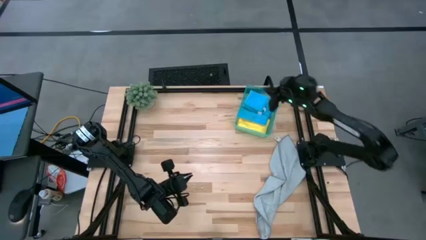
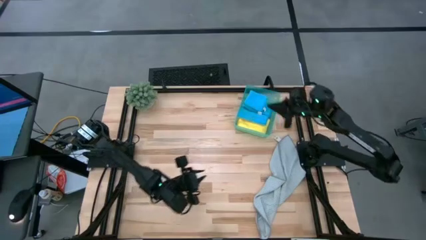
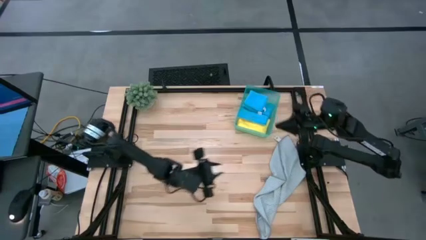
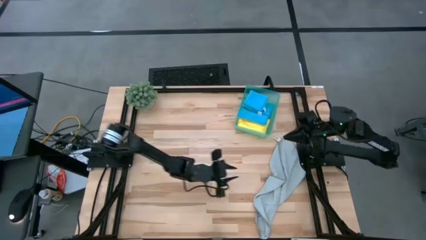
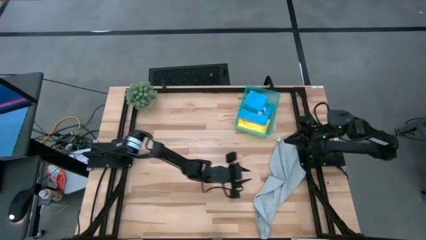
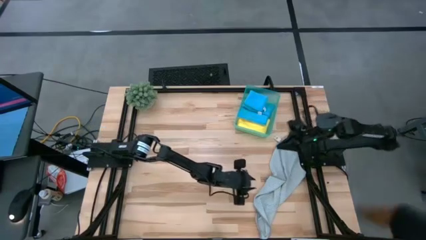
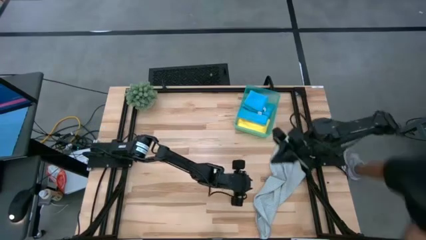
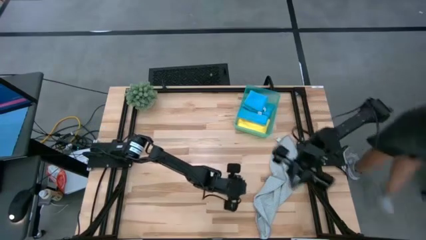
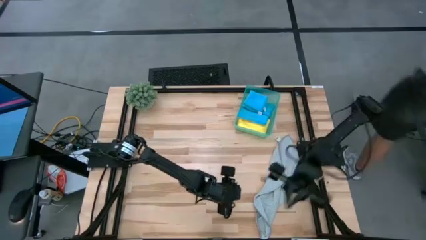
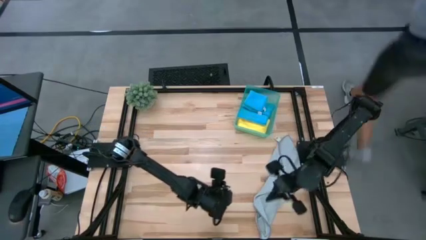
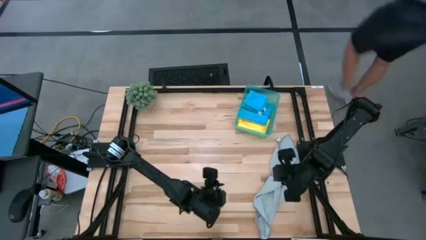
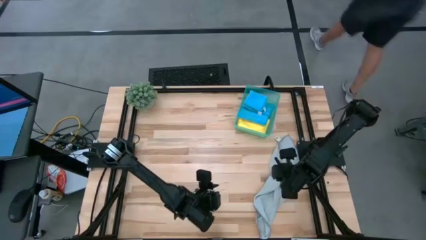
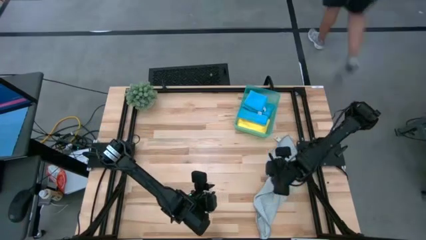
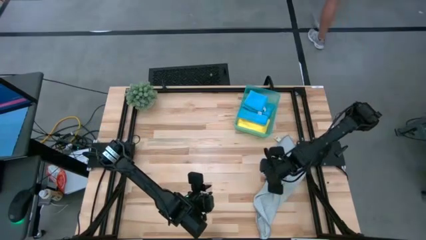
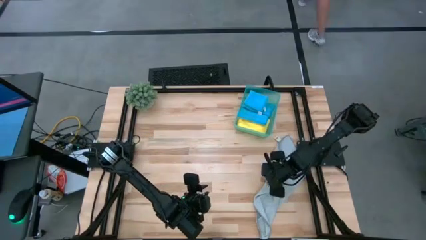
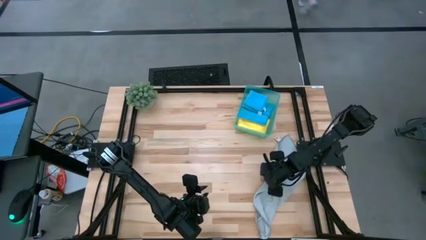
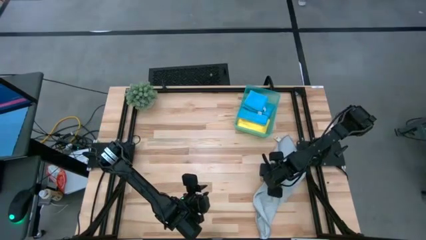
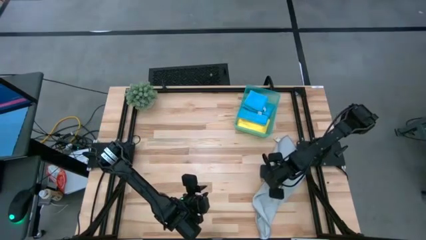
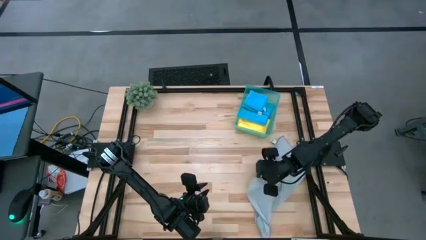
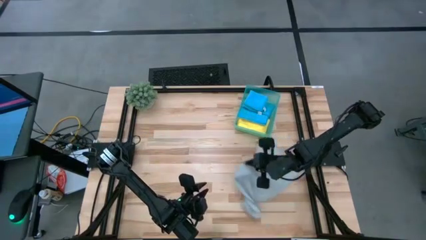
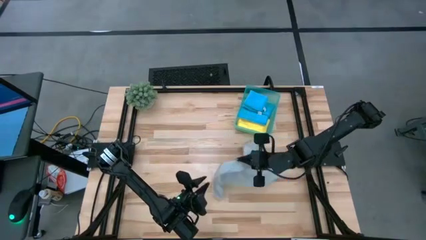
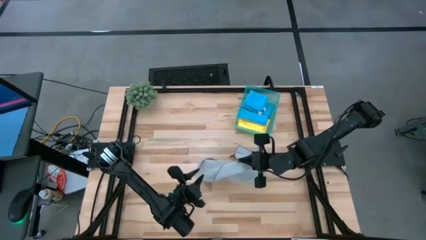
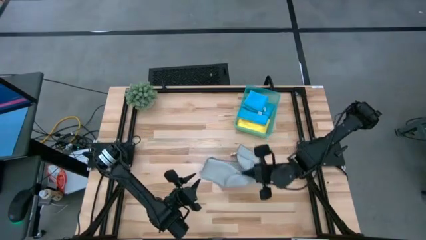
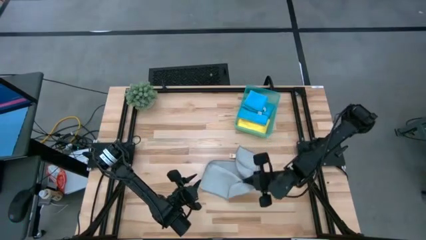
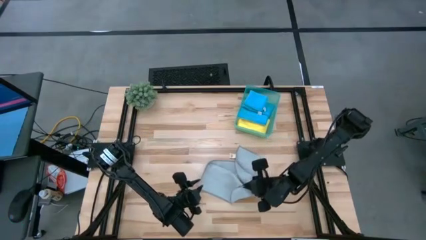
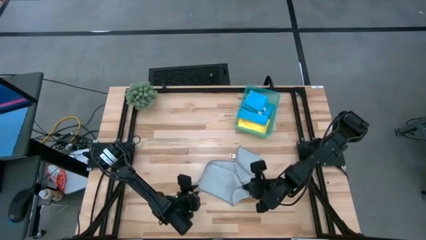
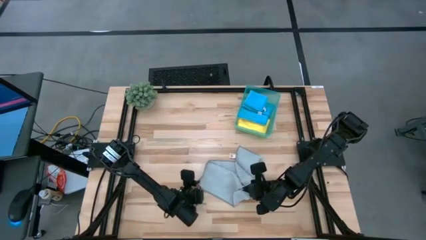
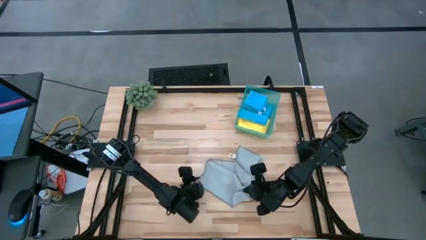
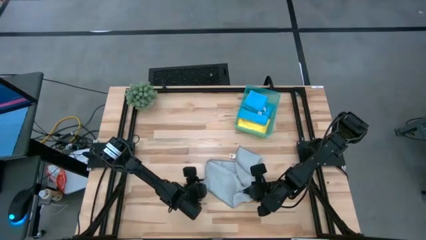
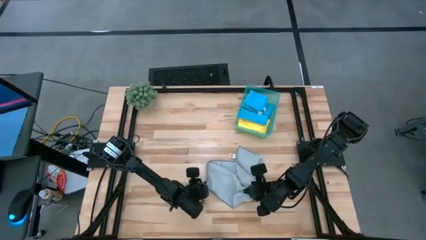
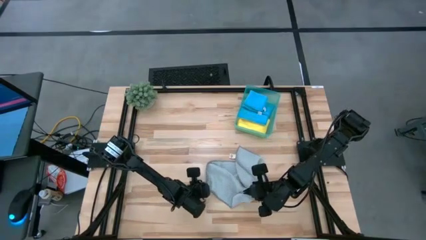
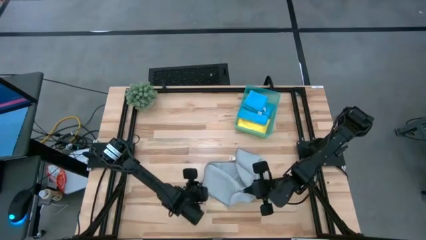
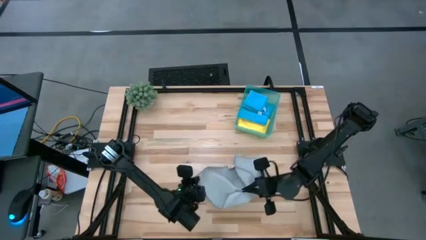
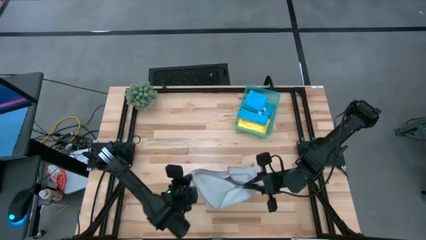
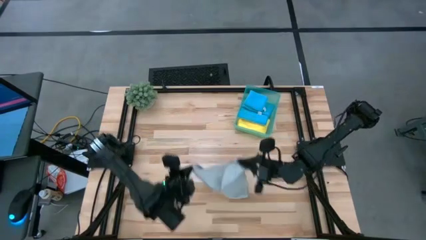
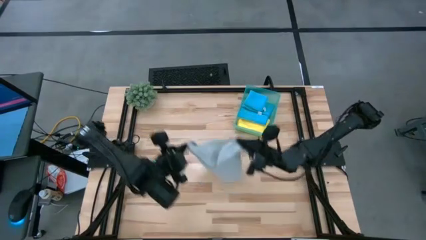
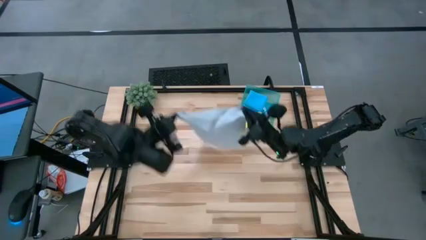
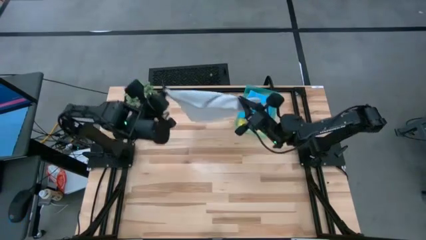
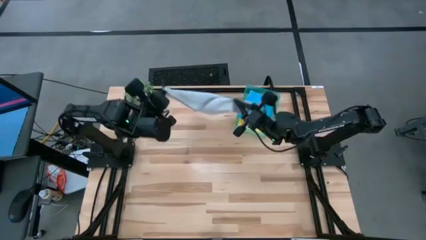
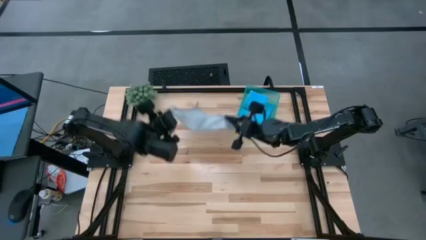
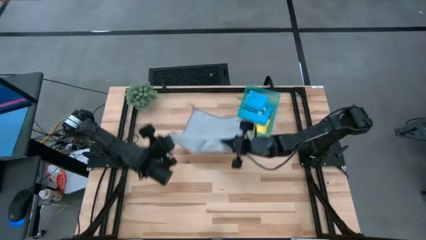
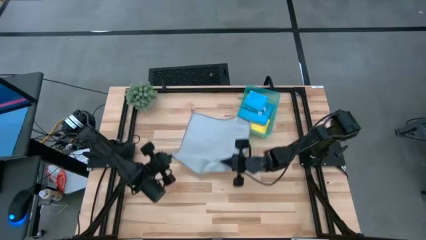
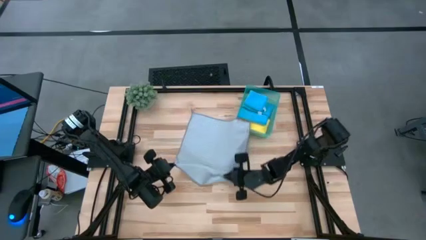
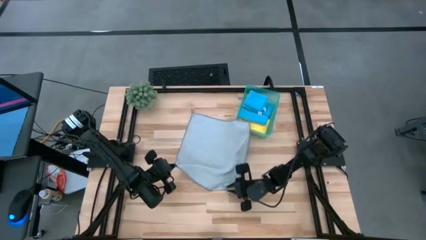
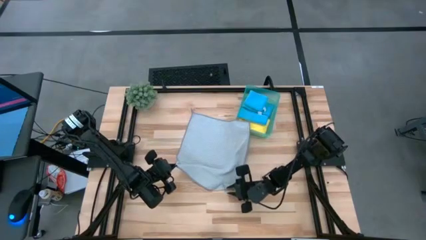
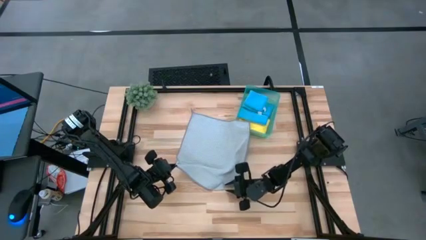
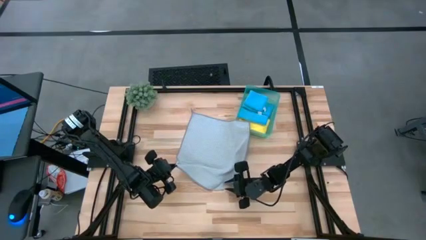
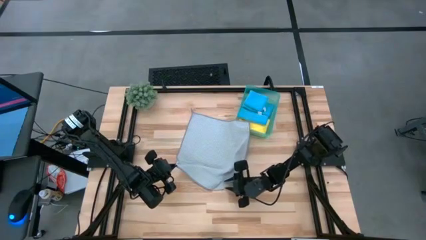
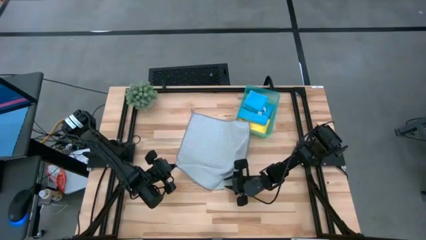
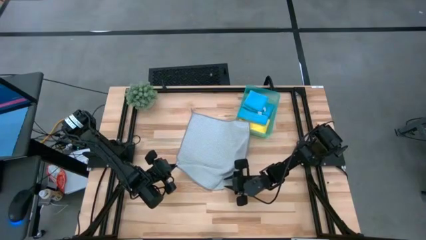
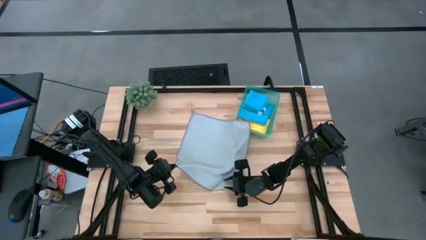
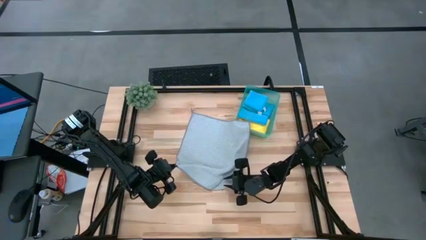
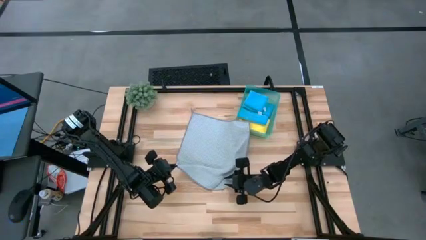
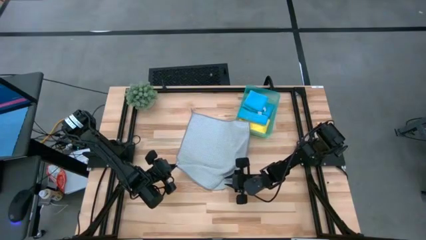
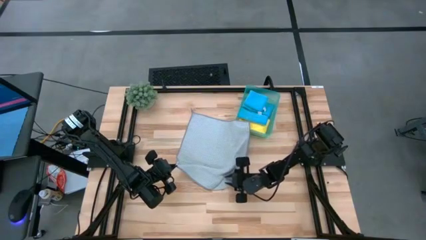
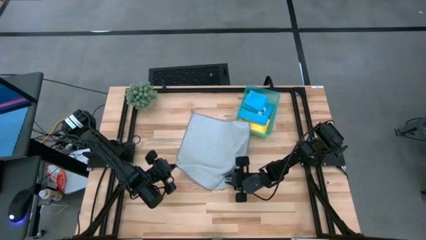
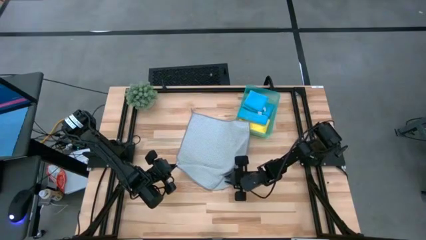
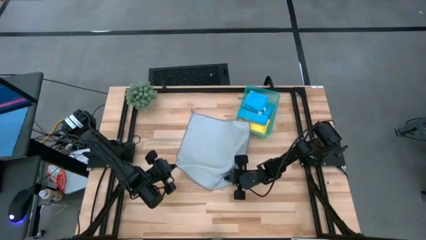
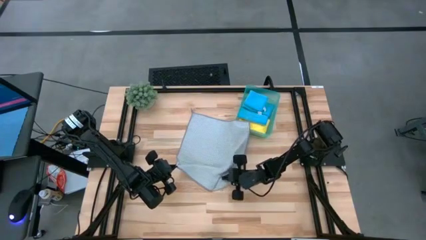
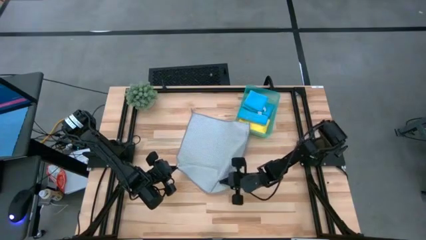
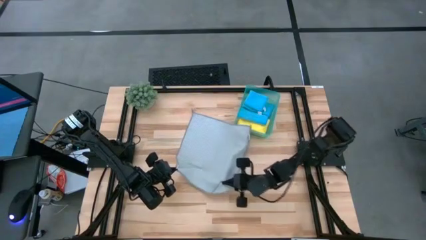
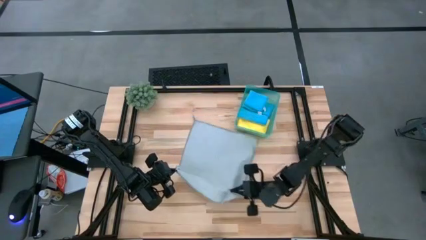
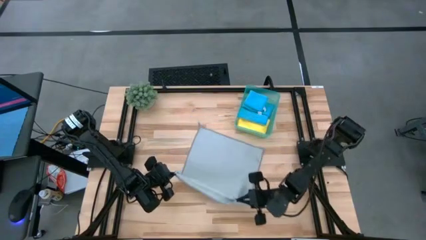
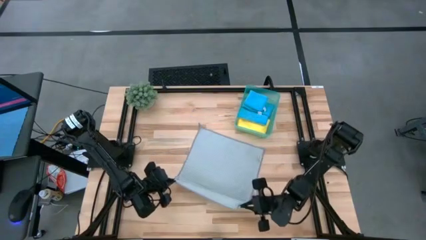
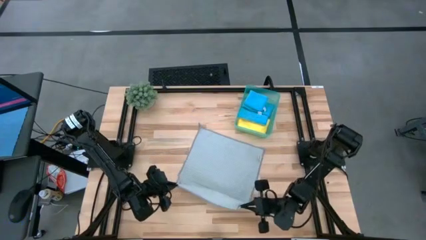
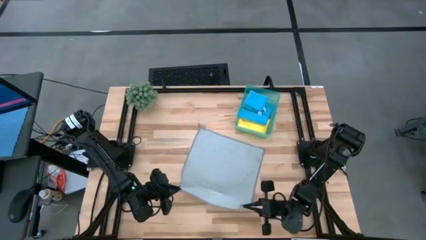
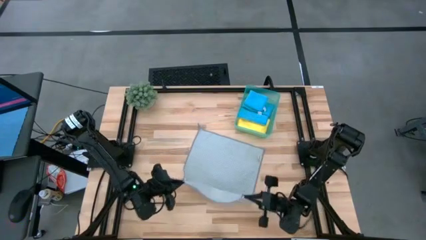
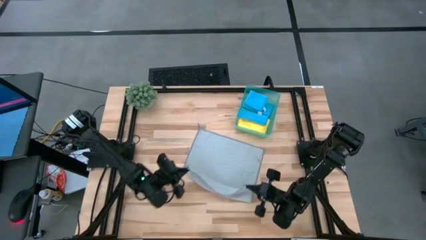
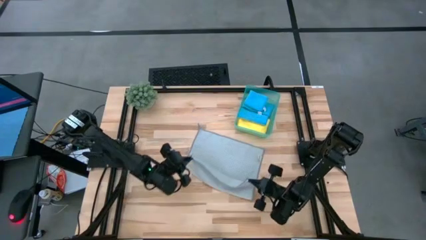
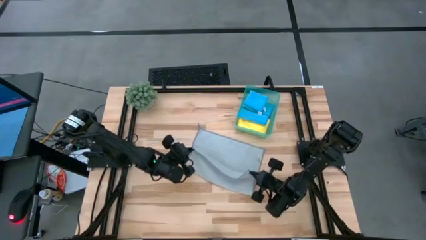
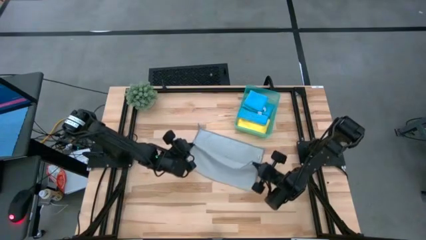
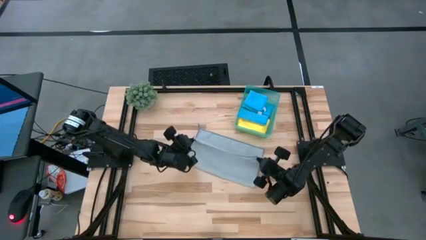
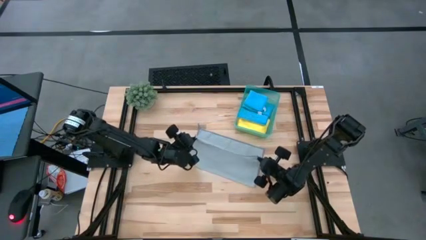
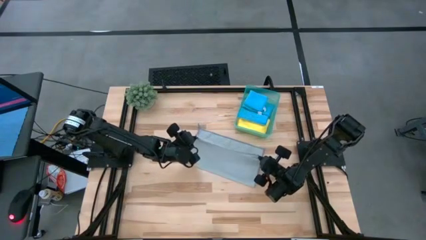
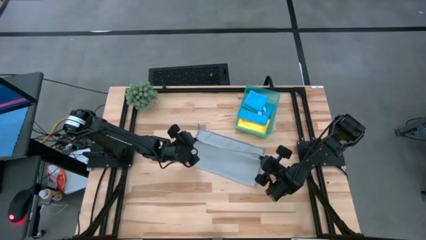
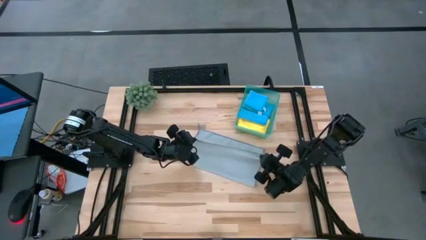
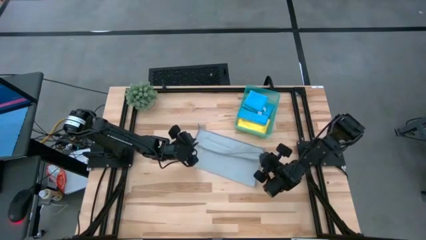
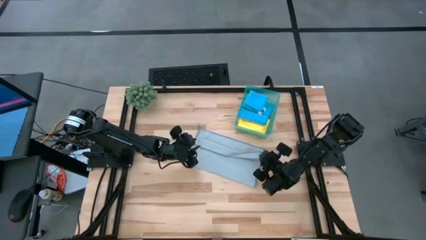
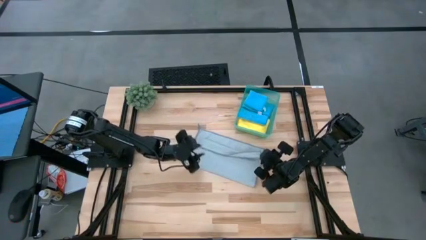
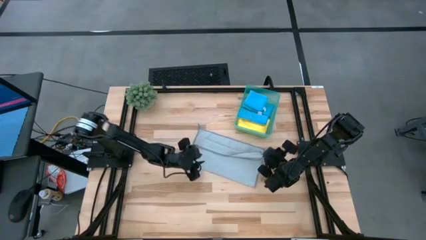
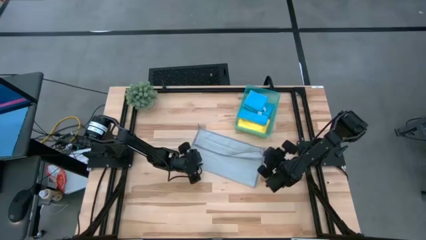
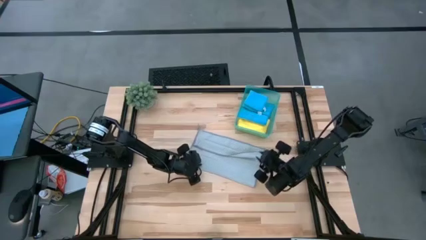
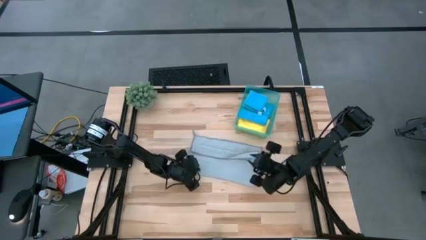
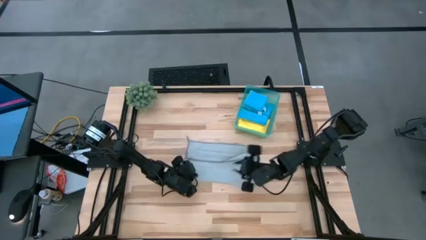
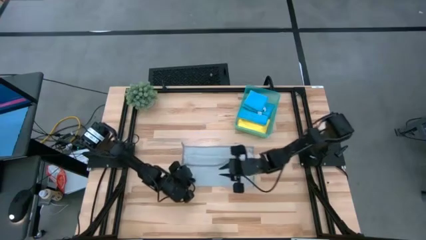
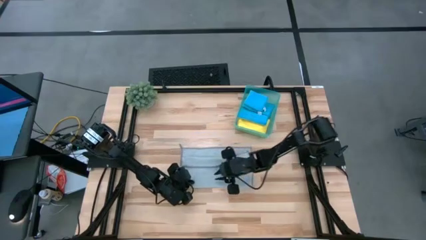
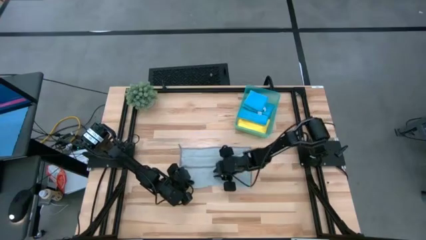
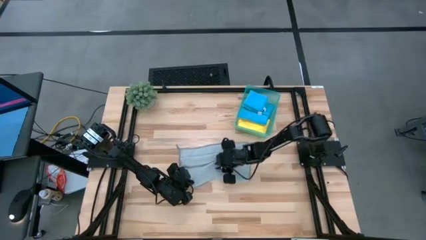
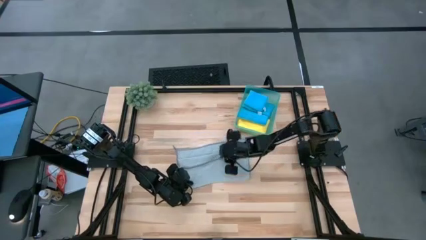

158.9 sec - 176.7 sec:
Task: Fold microfiber towels
Fold the gray towel
